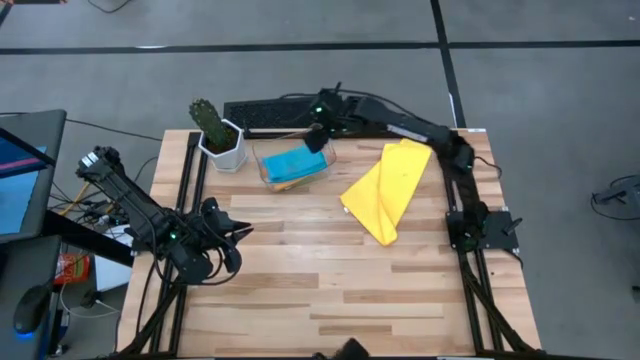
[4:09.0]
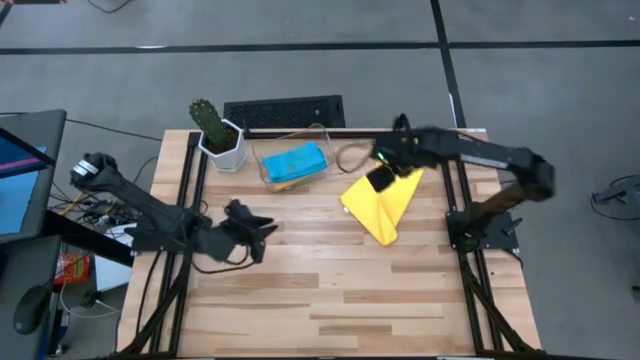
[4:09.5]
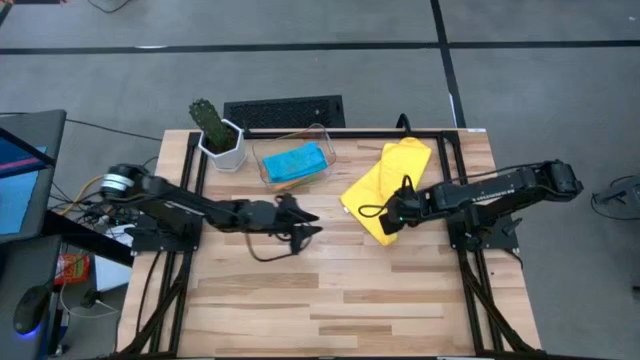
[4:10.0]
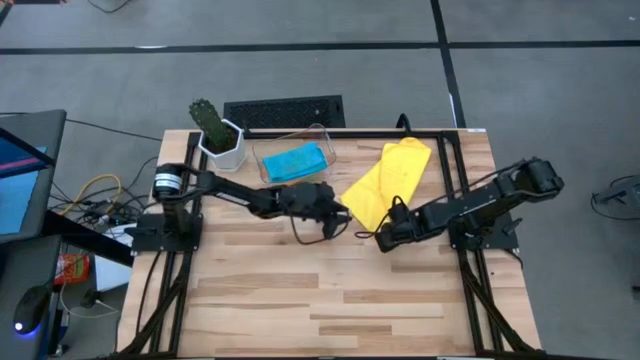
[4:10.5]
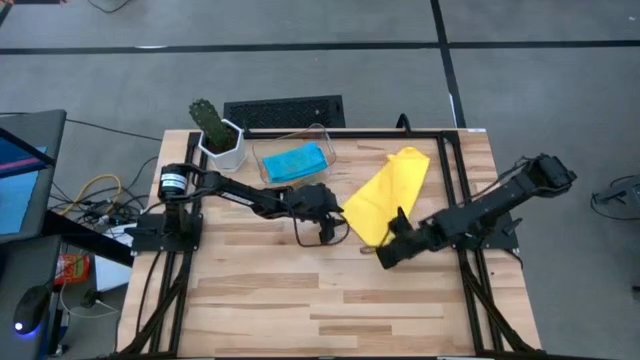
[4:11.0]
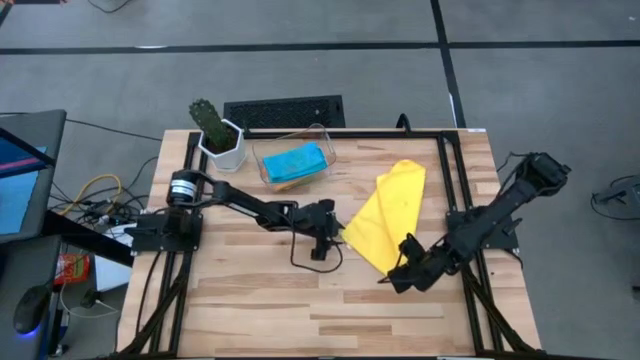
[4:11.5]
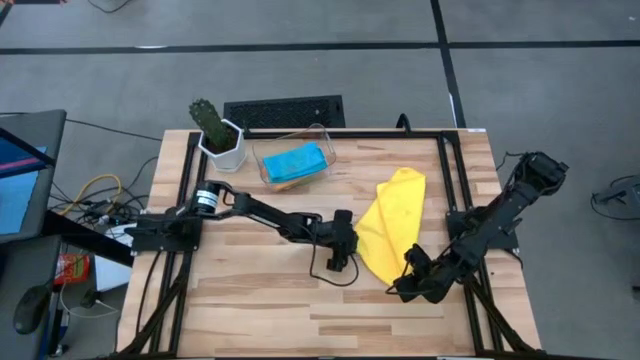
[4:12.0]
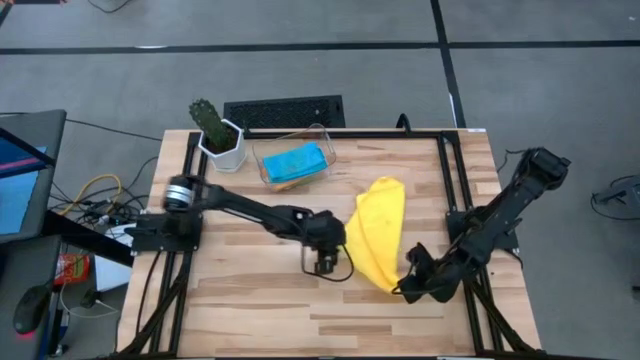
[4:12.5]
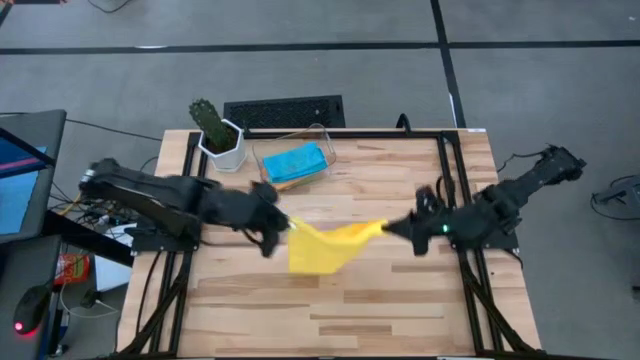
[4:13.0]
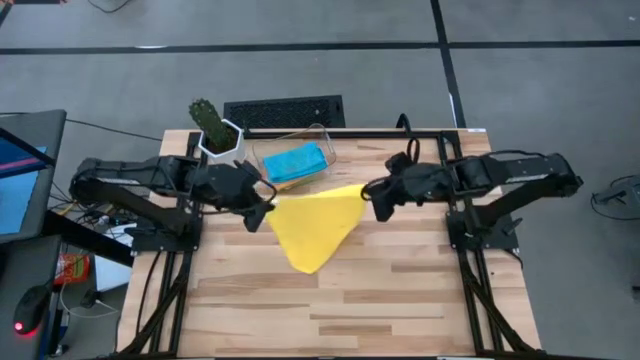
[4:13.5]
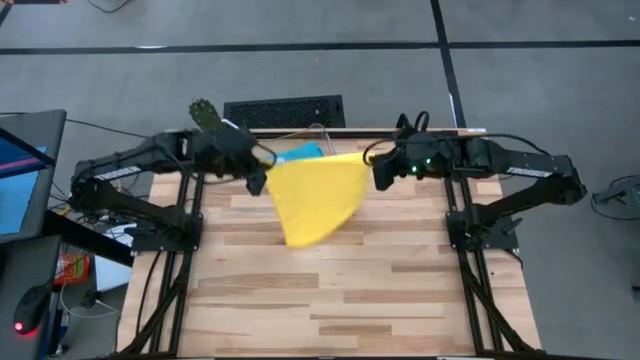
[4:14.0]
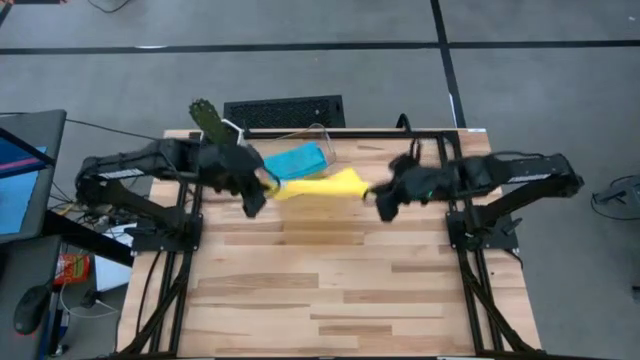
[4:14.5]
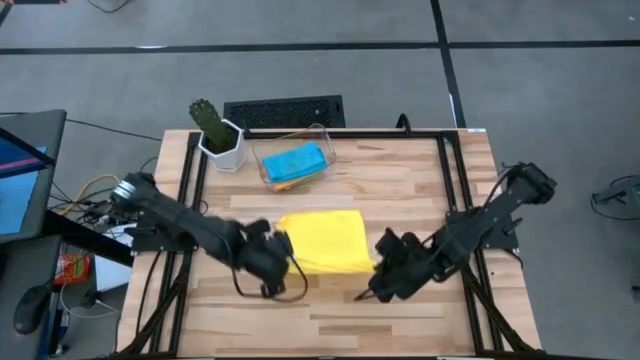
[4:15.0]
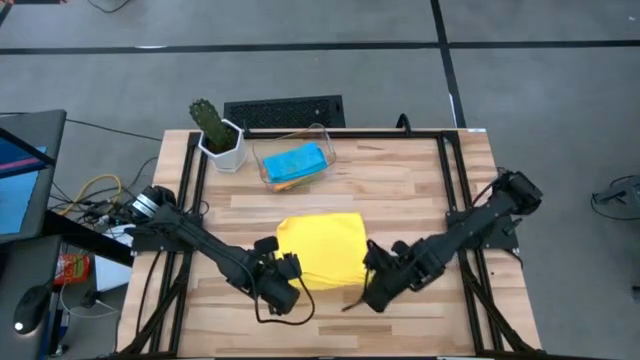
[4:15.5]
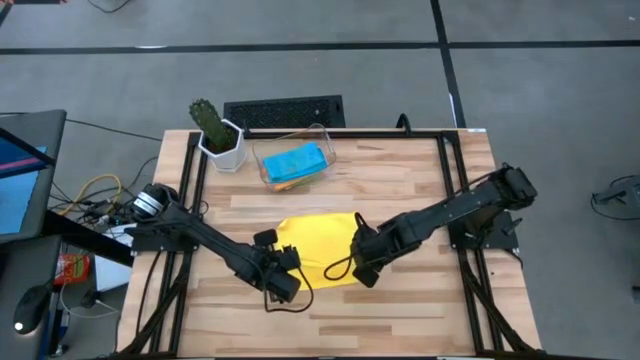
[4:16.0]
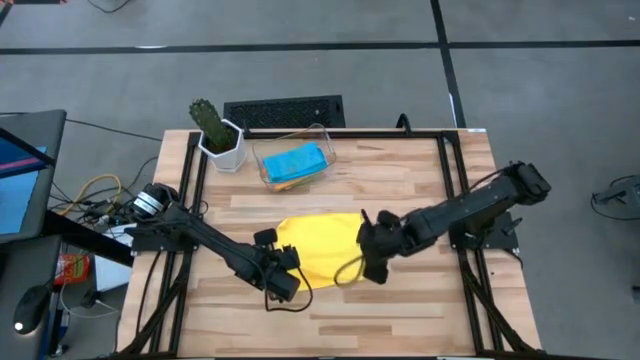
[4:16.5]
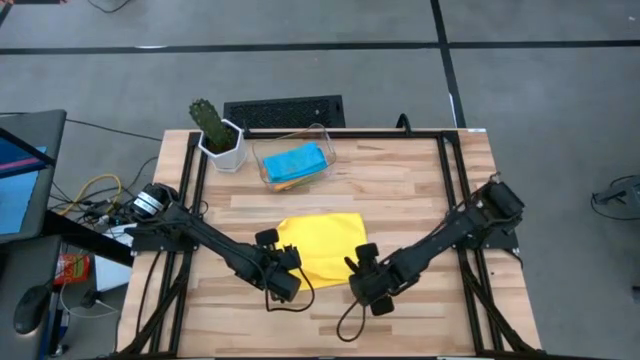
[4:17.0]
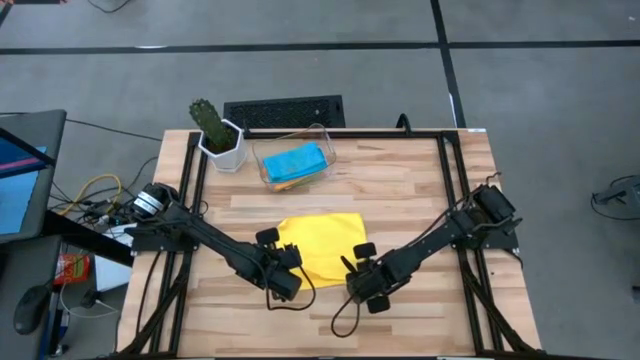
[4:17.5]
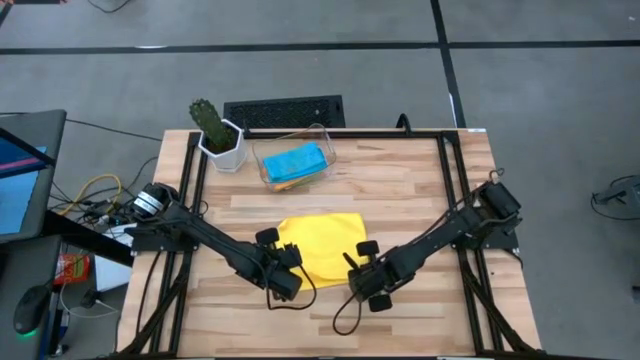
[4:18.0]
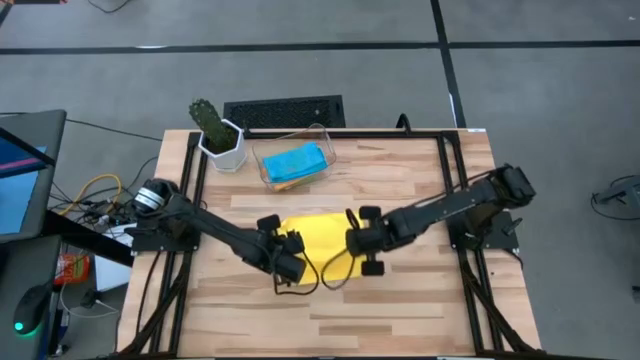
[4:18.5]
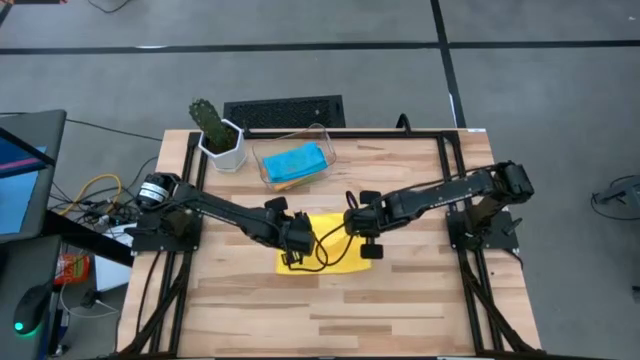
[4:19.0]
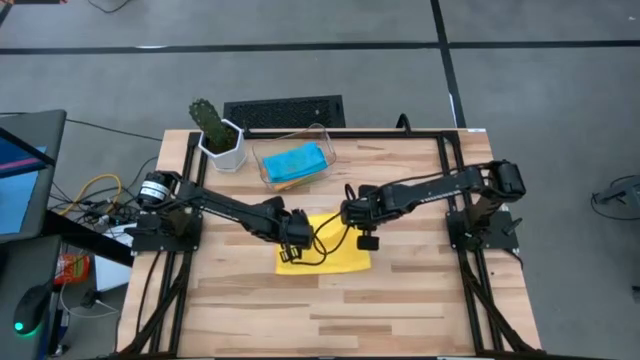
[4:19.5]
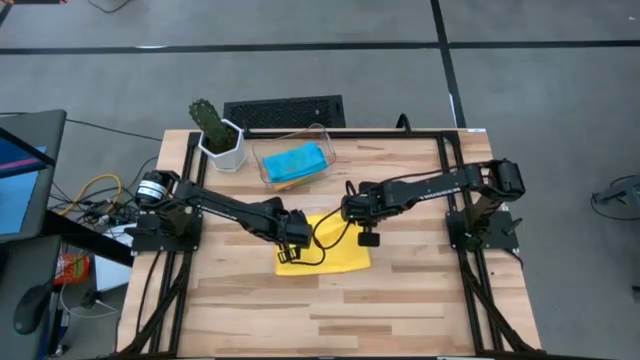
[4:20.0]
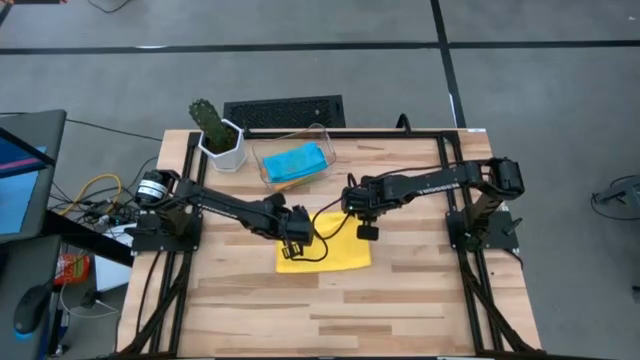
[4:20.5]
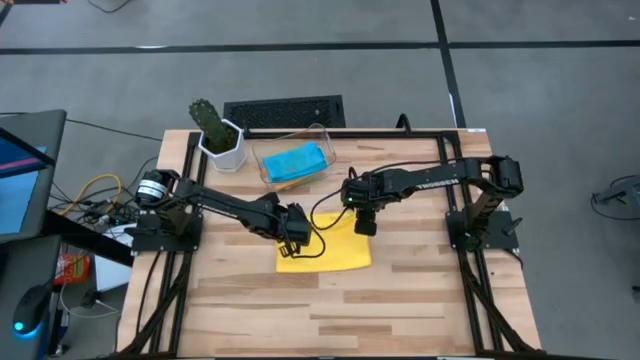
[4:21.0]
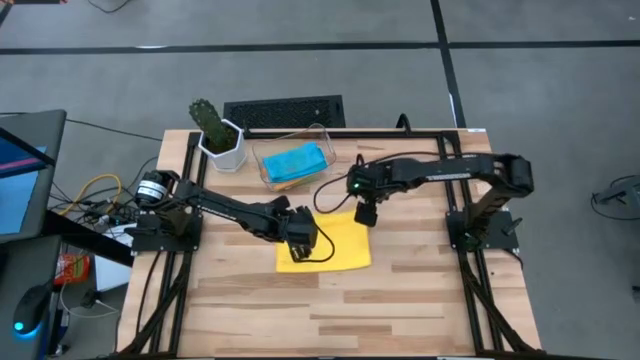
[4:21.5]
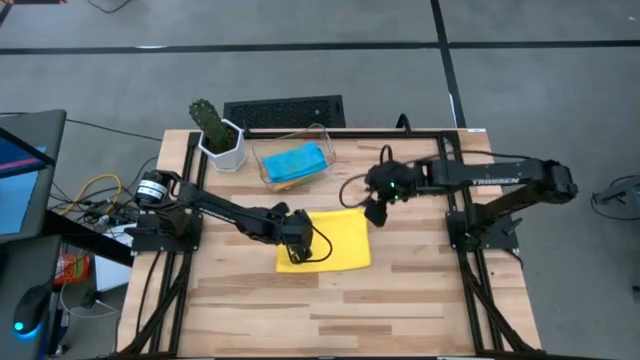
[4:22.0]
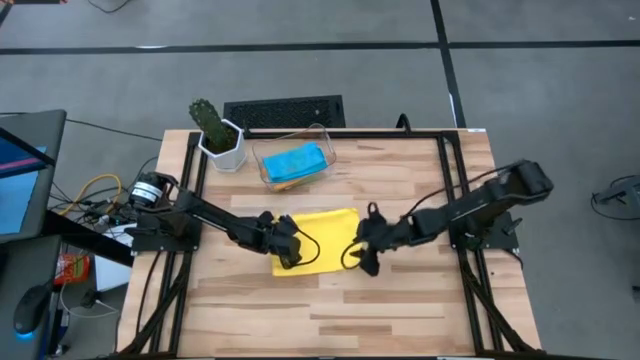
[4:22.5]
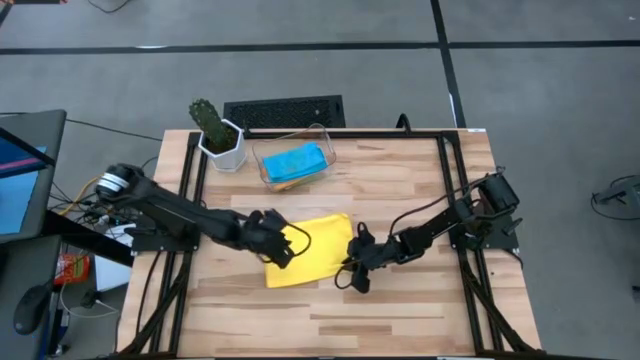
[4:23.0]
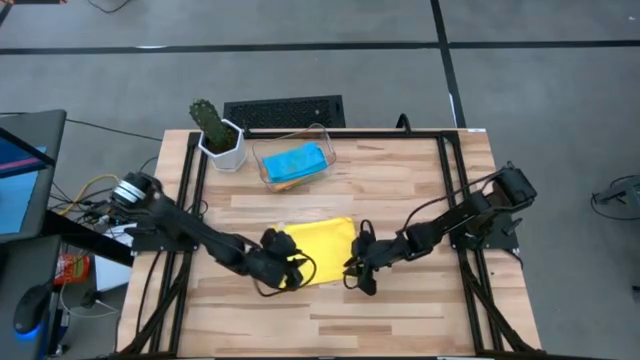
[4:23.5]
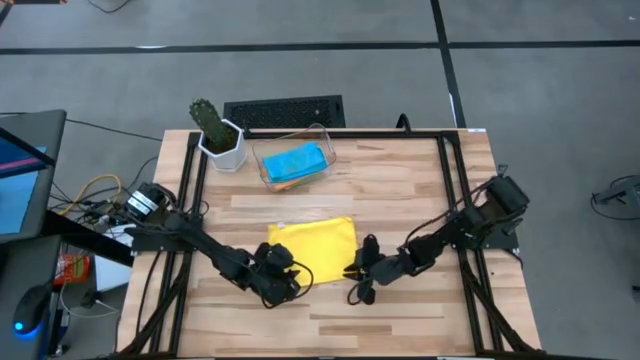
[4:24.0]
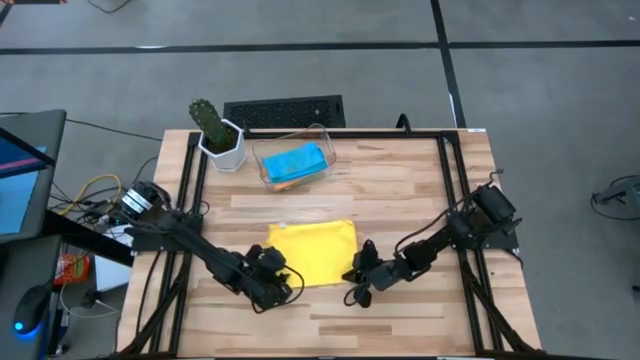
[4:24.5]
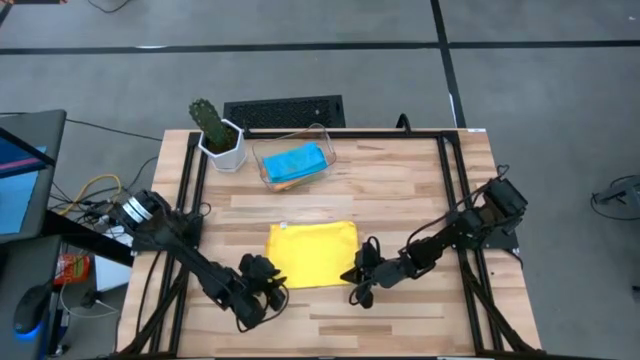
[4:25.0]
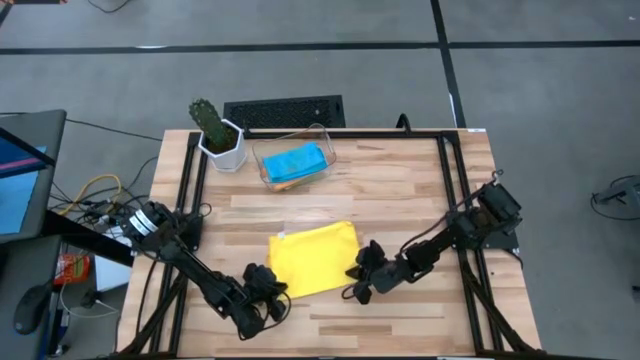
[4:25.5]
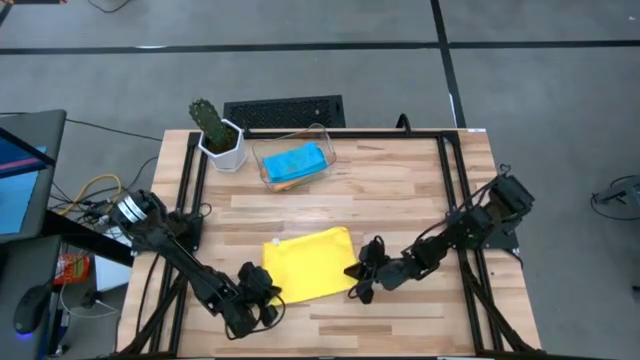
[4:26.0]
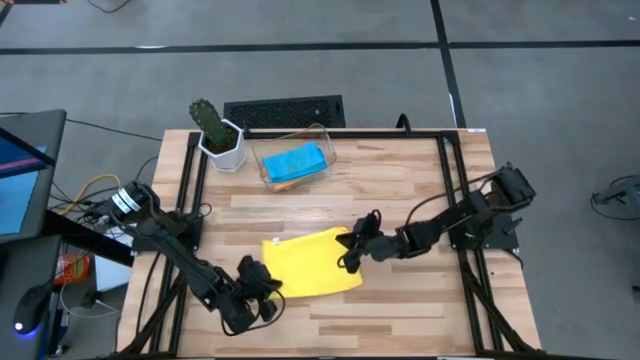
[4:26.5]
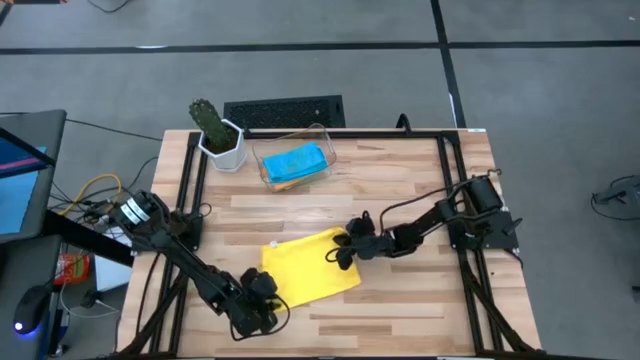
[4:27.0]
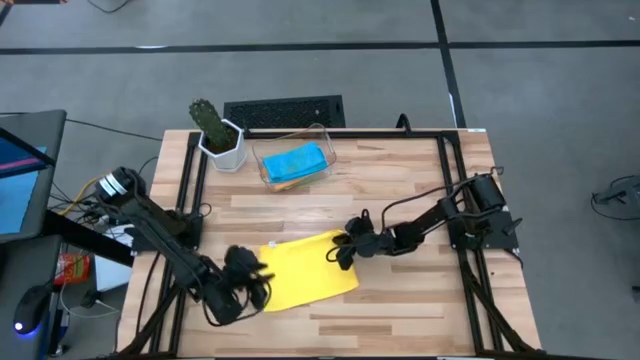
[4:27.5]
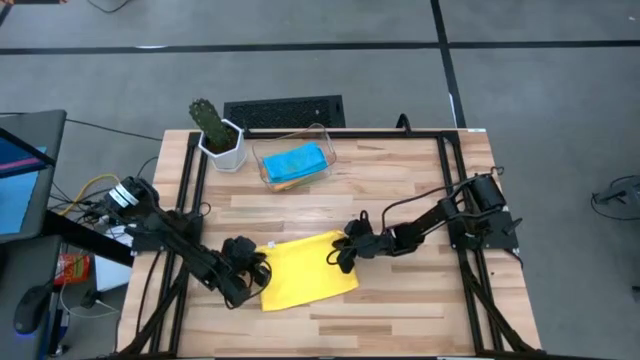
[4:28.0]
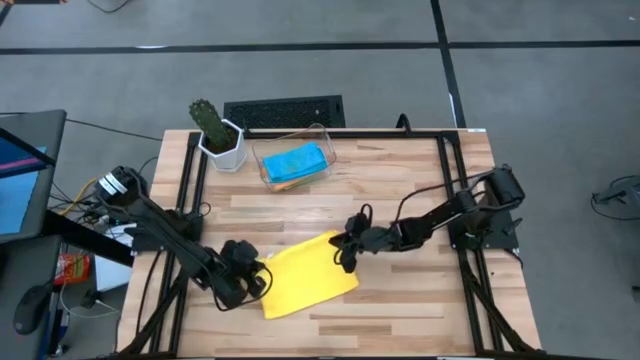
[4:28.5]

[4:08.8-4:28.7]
Task: Fold microfiber towels
Fold the yellow microfiber cloth
